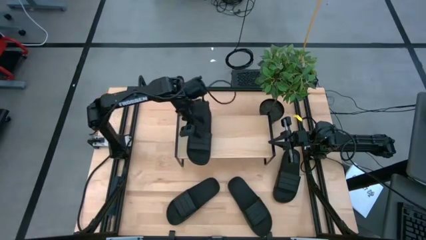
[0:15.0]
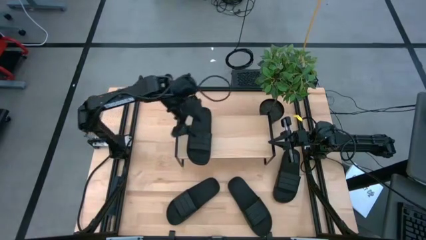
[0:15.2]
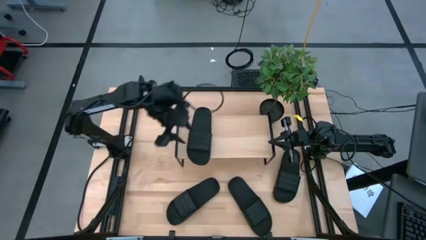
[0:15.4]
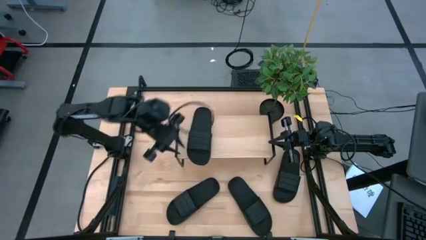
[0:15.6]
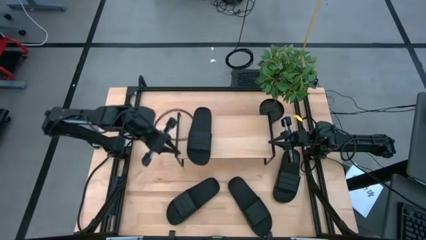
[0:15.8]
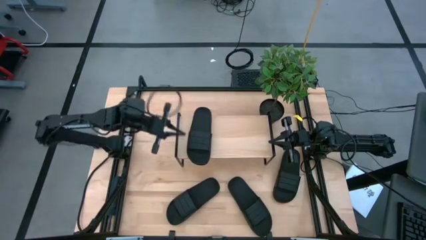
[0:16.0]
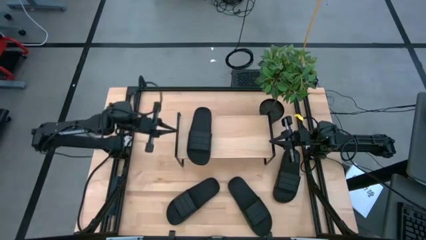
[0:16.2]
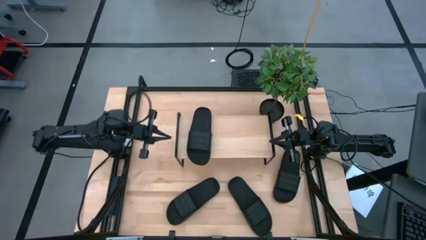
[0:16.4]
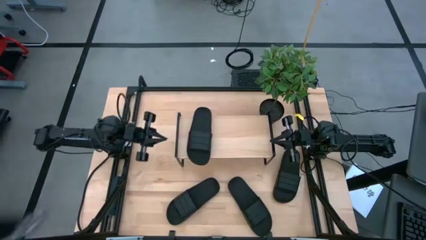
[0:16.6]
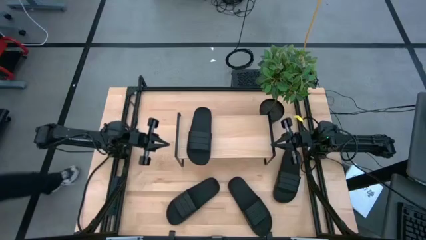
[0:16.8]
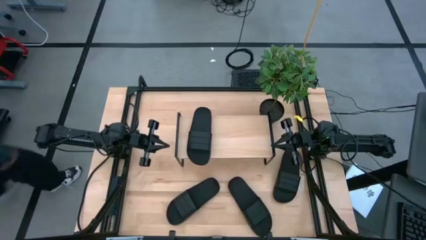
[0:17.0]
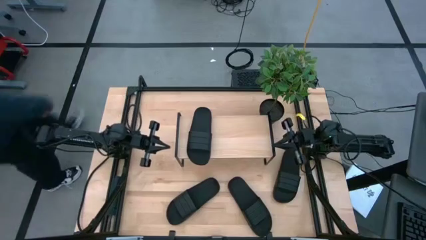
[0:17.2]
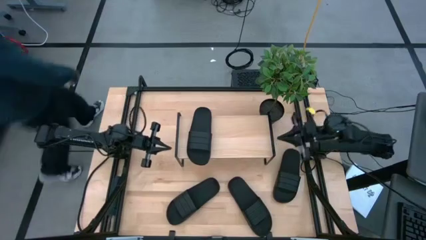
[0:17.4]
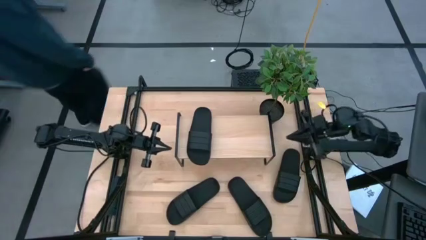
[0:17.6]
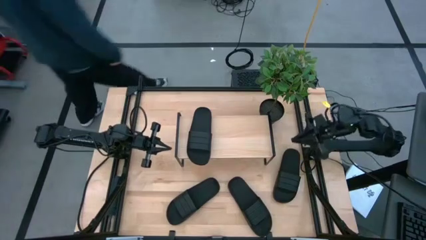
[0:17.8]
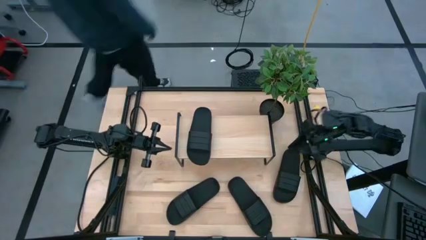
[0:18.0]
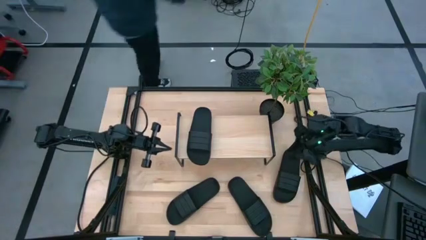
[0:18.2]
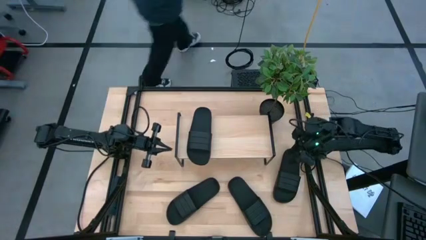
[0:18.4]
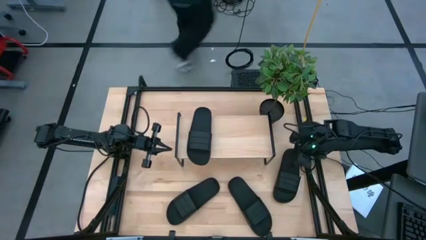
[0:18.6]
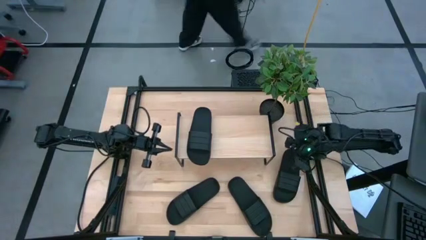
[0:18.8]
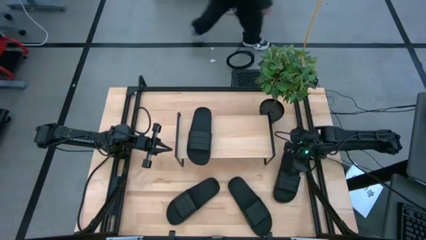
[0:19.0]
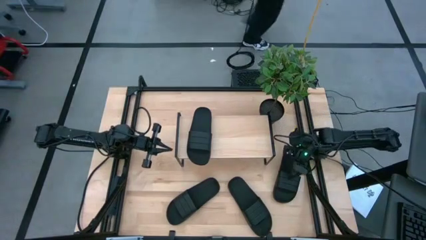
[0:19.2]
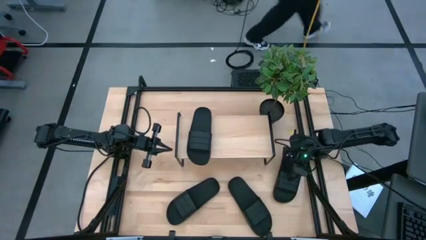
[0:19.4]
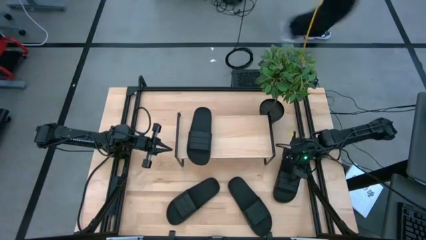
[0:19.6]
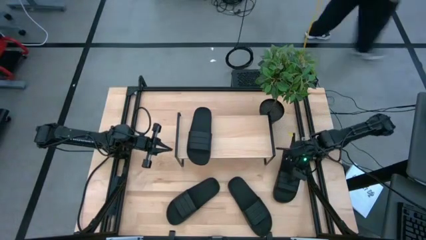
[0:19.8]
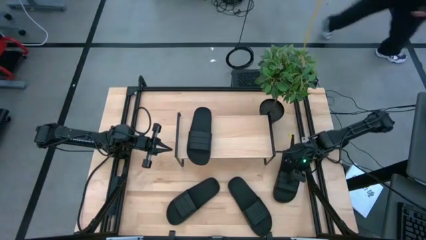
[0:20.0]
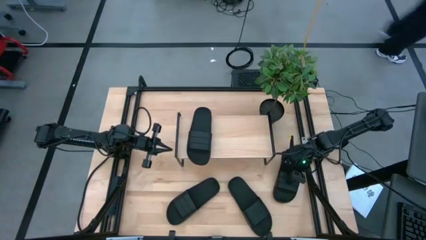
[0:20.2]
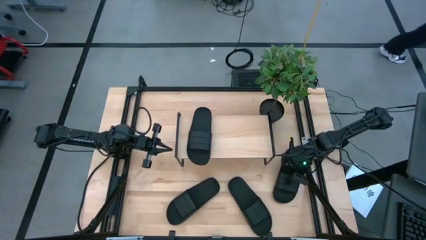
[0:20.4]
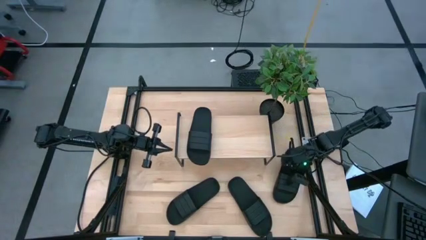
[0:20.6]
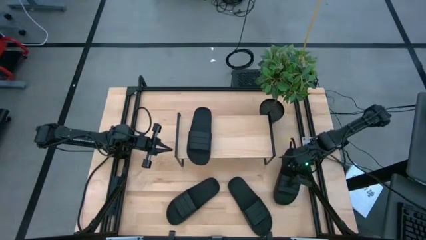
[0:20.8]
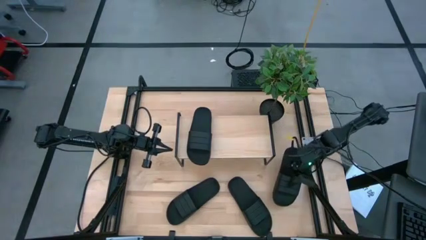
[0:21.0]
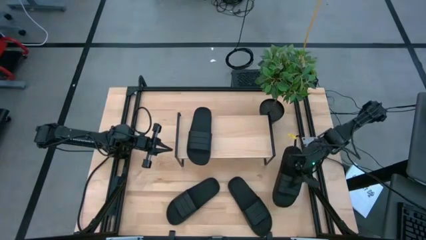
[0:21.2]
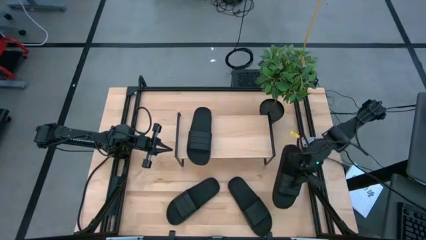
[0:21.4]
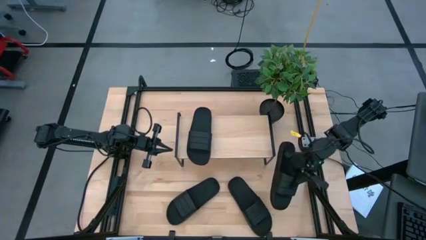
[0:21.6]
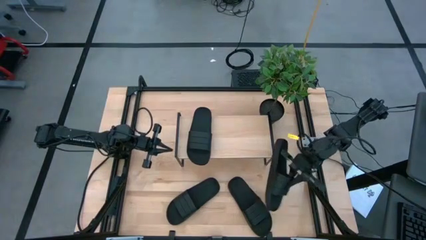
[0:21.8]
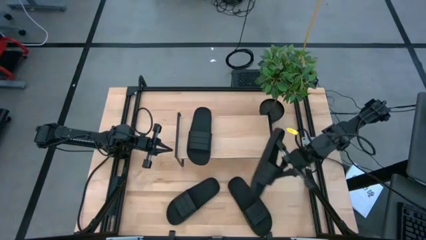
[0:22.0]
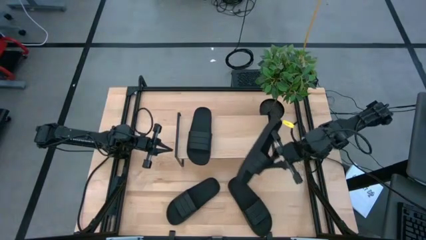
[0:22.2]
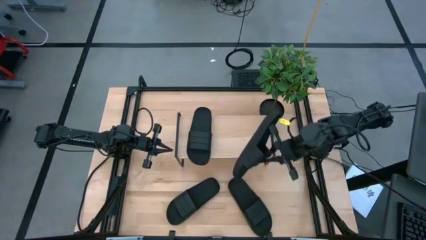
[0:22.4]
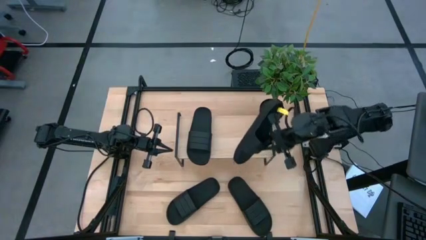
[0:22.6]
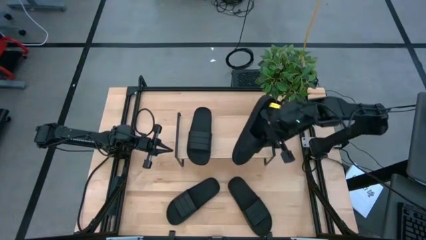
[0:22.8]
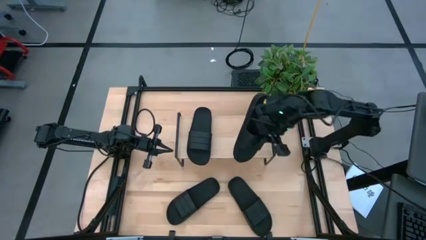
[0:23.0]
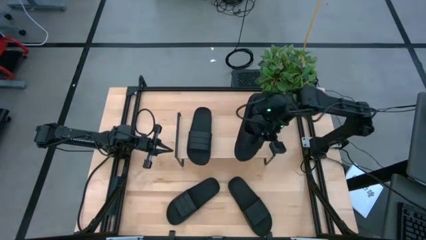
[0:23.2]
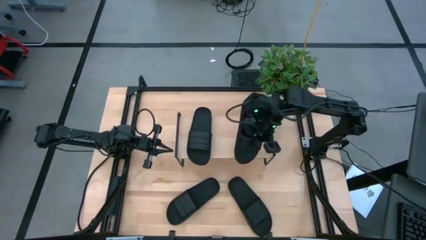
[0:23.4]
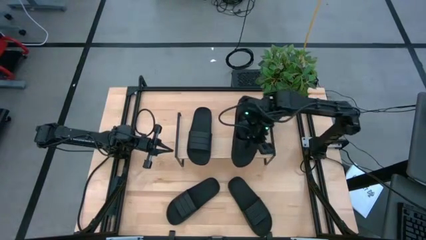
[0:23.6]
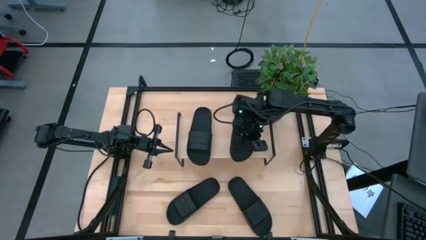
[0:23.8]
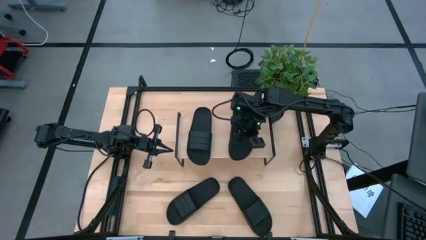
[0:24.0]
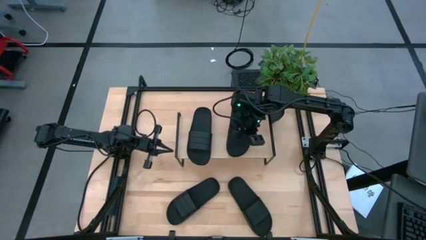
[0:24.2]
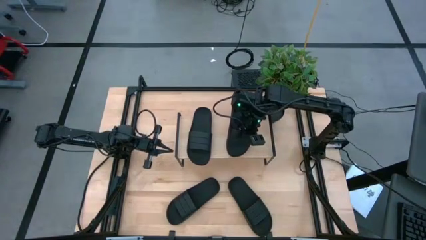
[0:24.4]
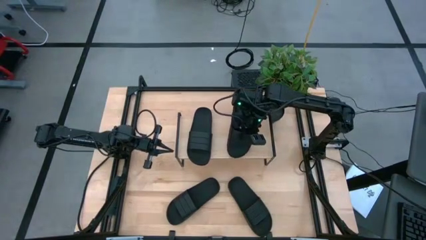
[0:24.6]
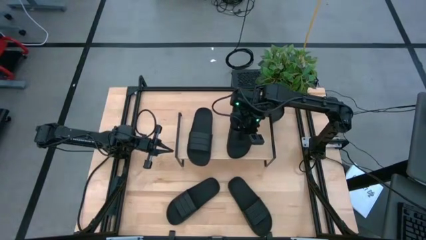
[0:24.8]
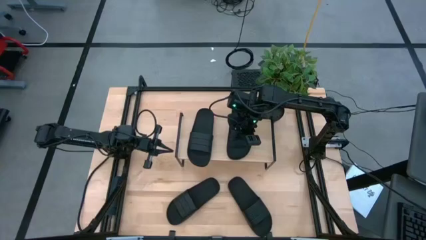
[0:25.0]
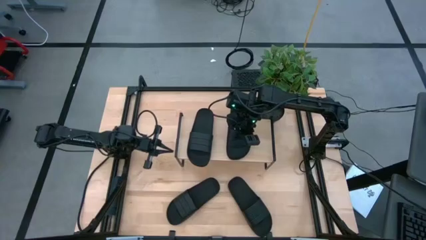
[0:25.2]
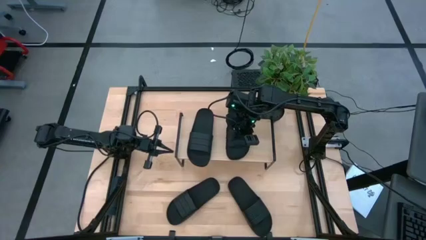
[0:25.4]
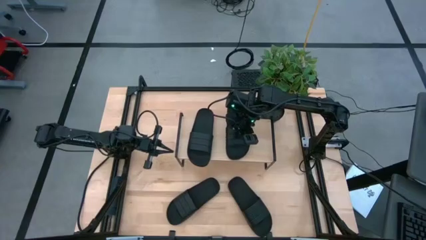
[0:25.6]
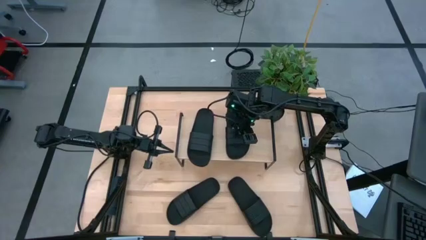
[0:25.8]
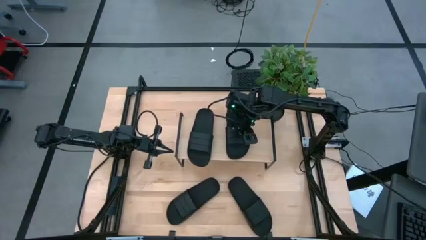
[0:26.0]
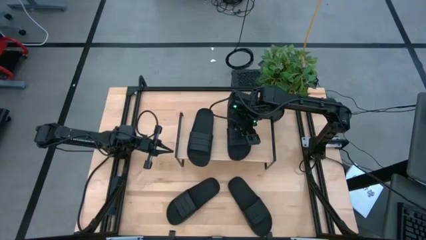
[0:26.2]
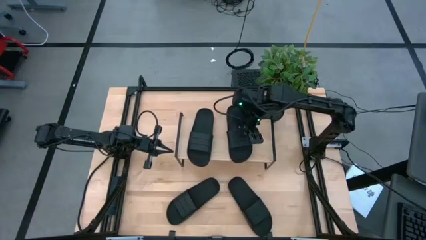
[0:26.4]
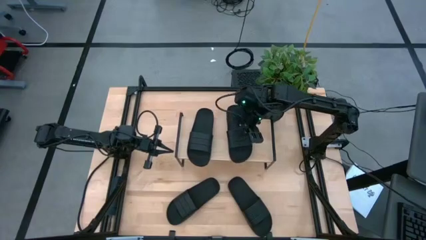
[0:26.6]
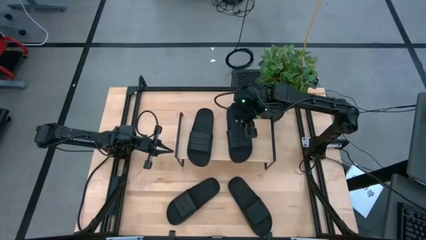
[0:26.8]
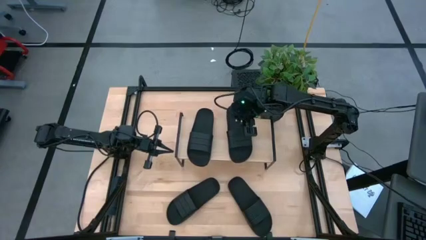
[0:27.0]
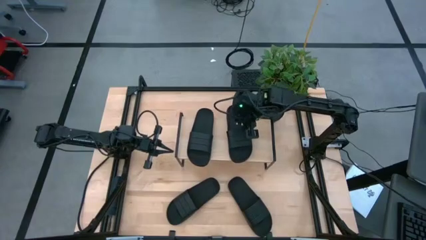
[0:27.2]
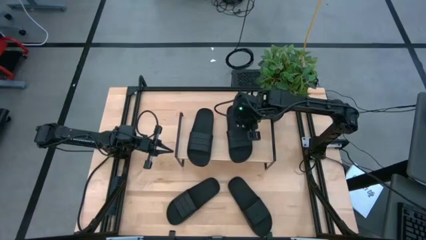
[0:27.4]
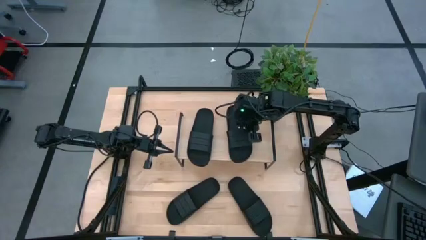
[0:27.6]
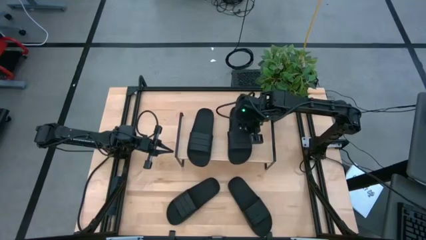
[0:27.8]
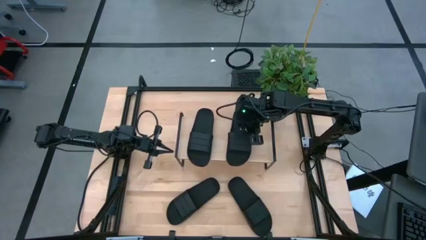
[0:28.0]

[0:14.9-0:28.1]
Task: Pick and place slides into the shelf
Put the black slipper on the shelf

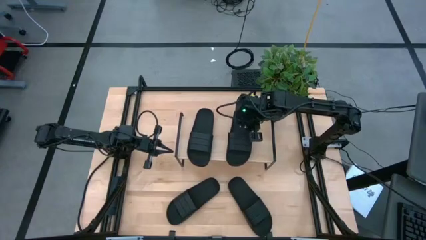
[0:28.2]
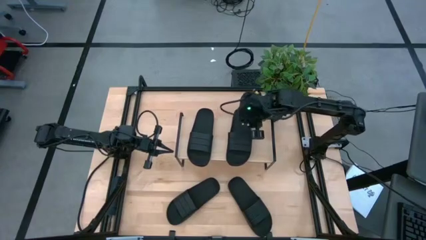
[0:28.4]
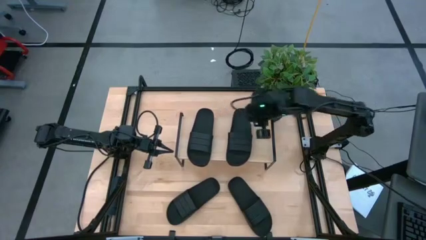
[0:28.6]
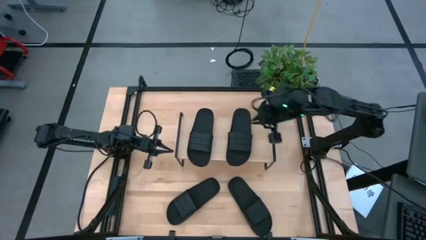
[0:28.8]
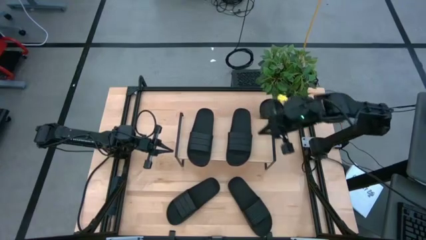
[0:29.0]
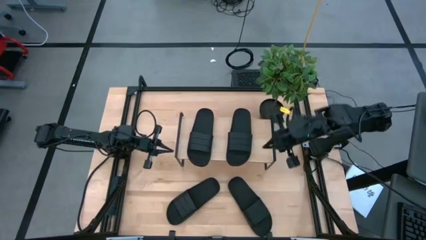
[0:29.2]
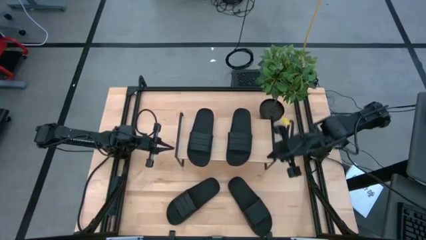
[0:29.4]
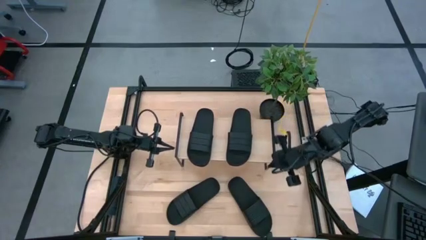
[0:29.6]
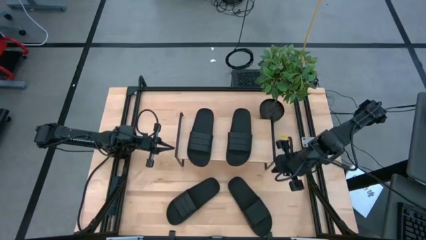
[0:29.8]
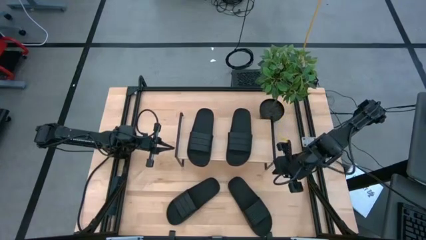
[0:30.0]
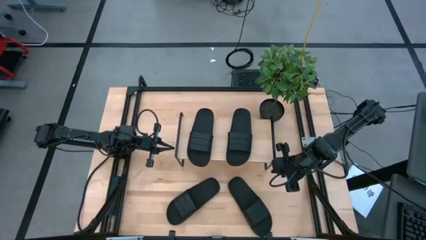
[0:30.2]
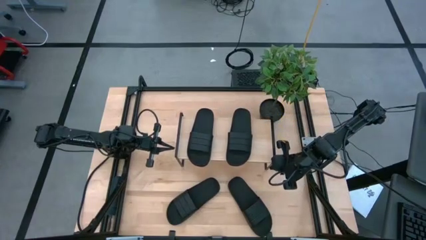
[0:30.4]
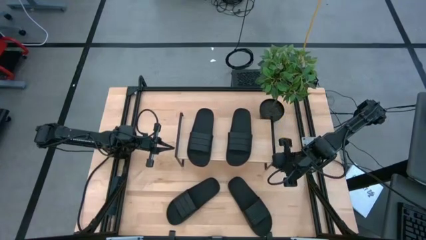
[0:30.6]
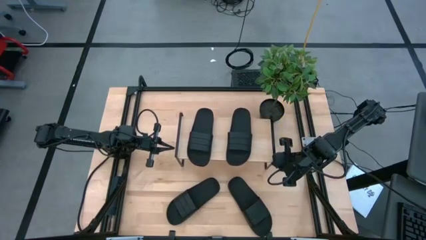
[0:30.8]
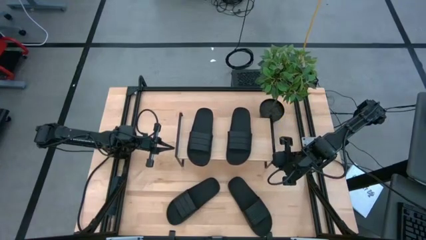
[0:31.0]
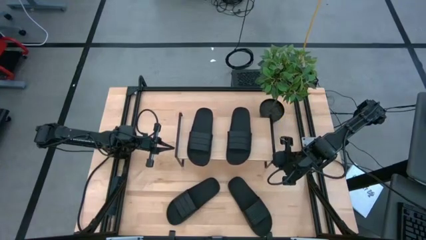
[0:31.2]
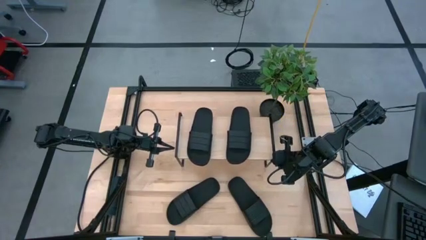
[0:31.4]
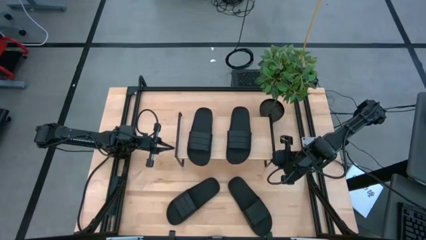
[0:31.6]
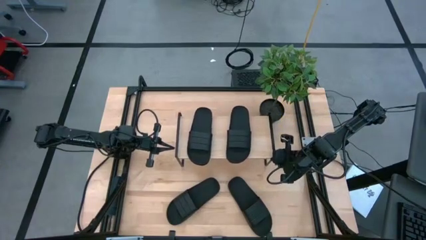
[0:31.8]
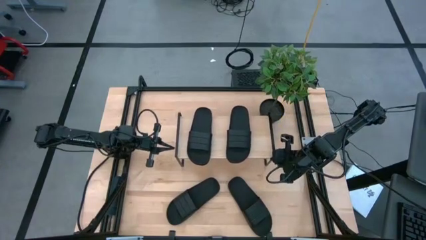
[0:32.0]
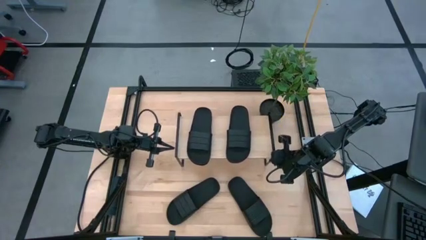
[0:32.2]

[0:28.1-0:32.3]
Adjust the shelf
